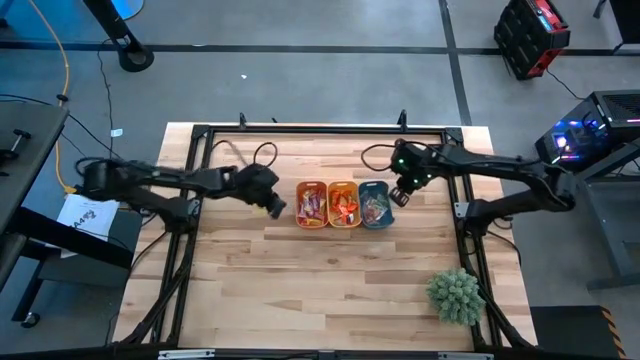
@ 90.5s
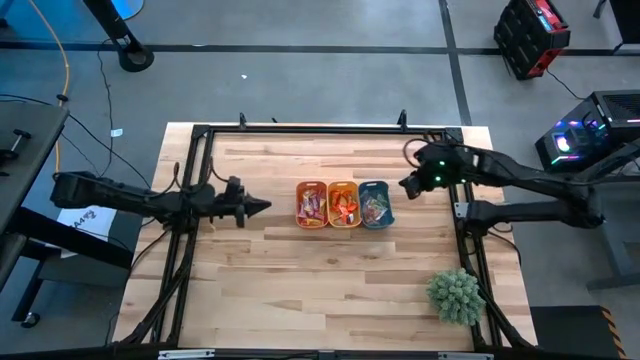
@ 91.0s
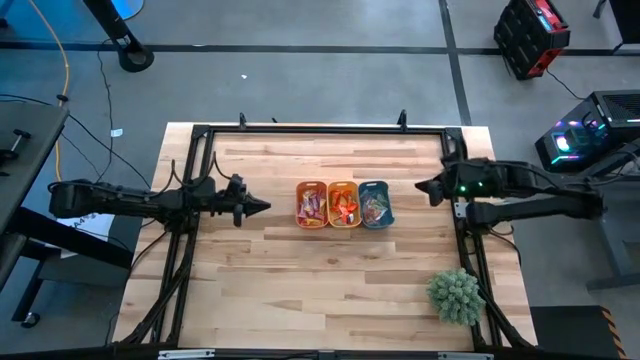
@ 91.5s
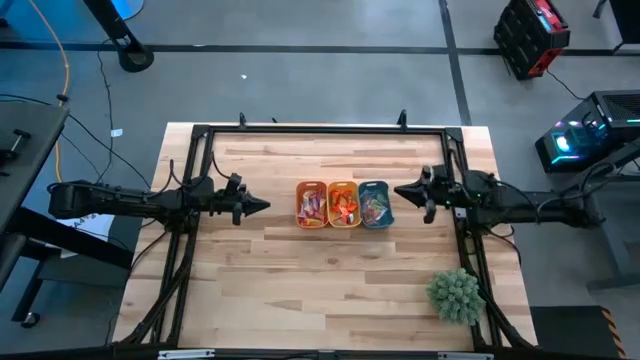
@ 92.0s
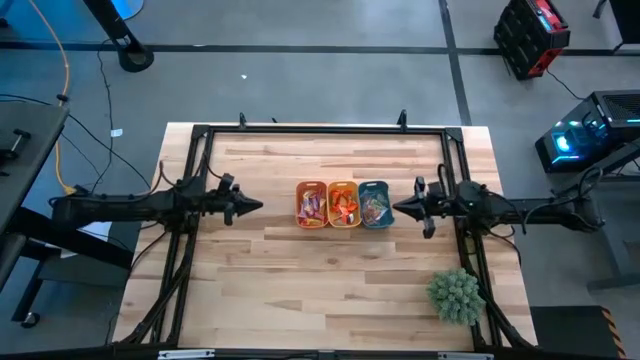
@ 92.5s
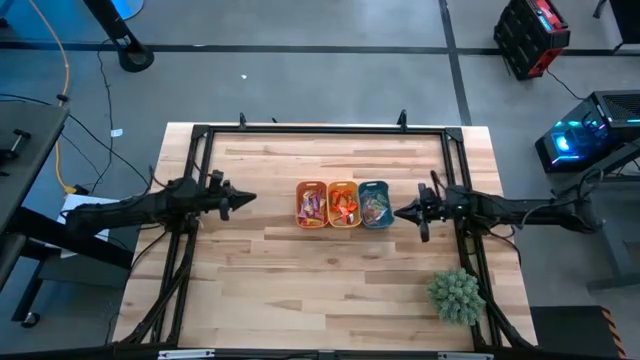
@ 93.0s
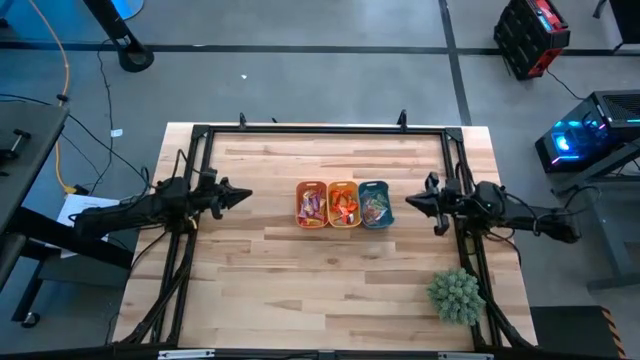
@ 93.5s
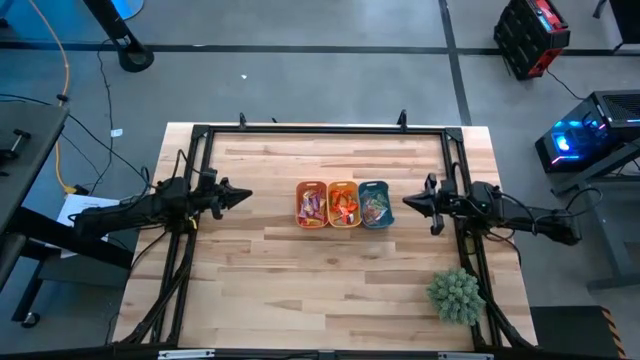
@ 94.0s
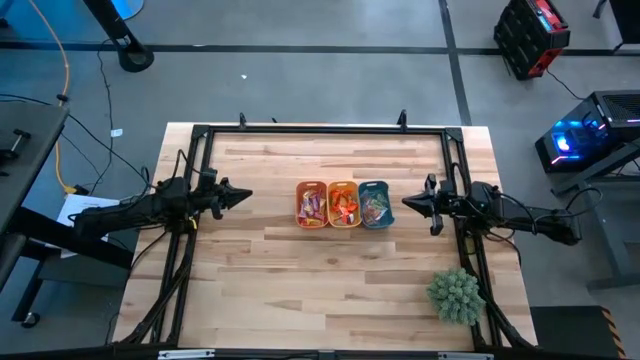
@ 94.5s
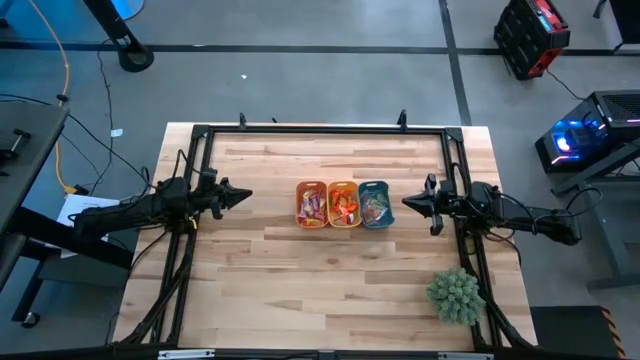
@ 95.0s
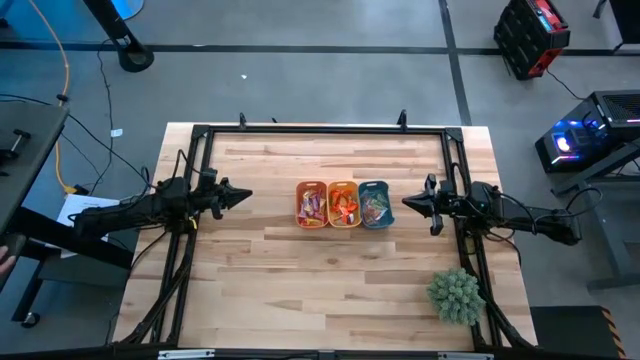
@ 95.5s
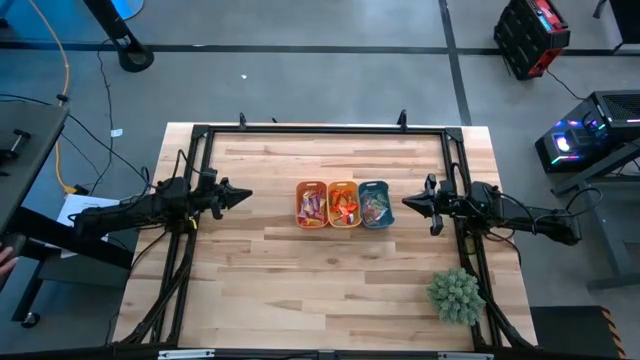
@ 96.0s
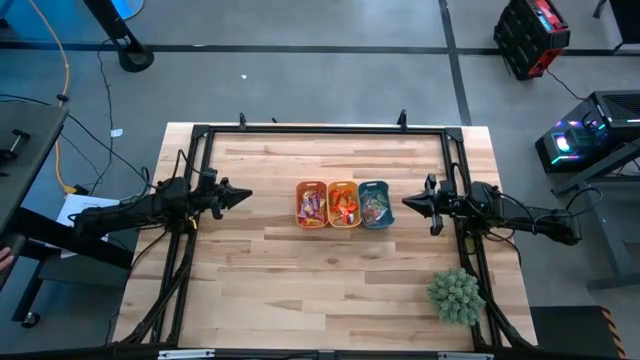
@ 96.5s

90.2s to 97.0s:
Task: Sort candy
Return to Home Position

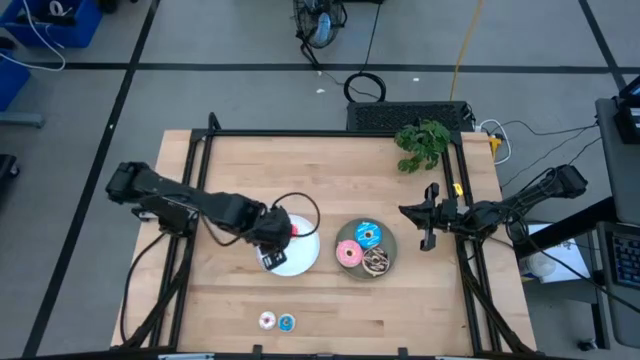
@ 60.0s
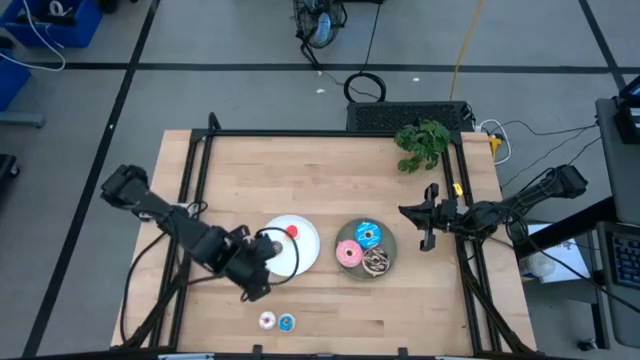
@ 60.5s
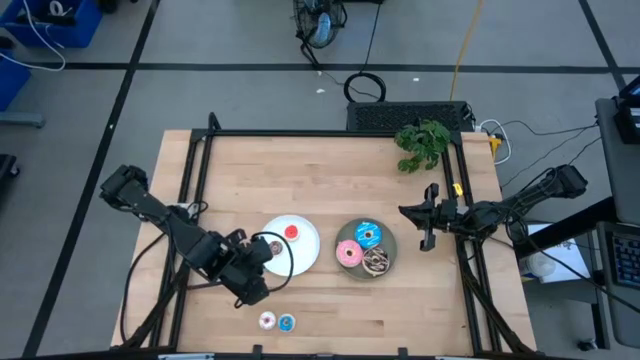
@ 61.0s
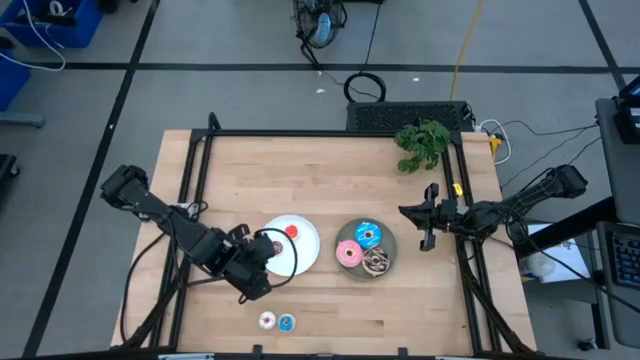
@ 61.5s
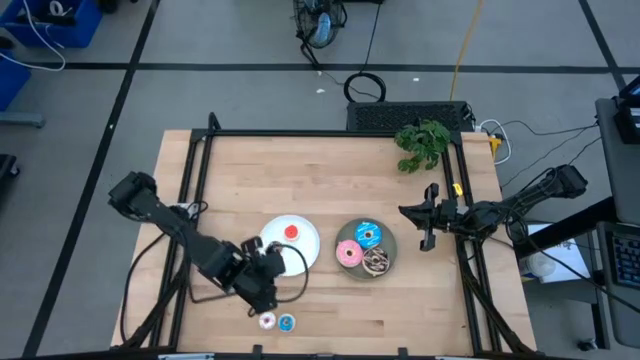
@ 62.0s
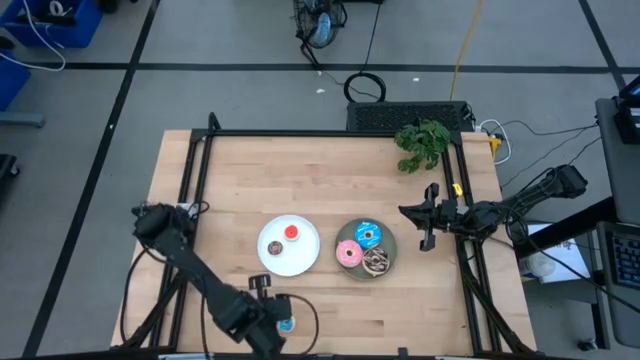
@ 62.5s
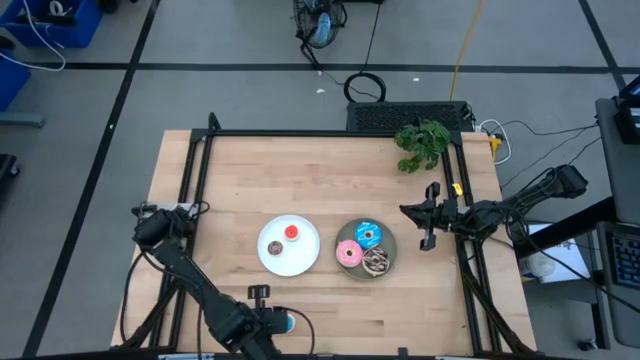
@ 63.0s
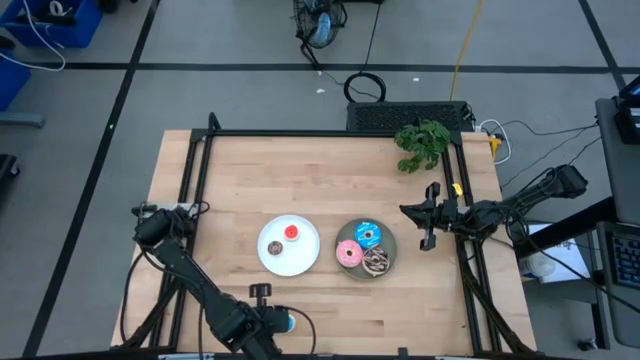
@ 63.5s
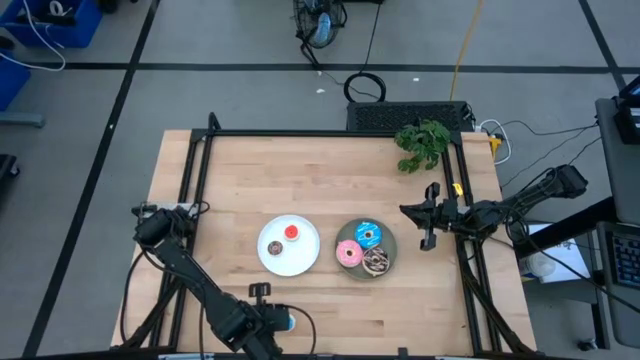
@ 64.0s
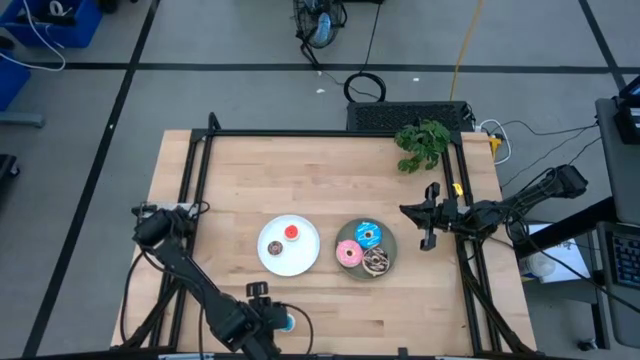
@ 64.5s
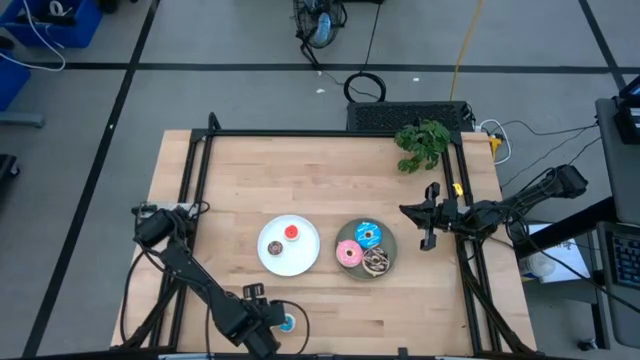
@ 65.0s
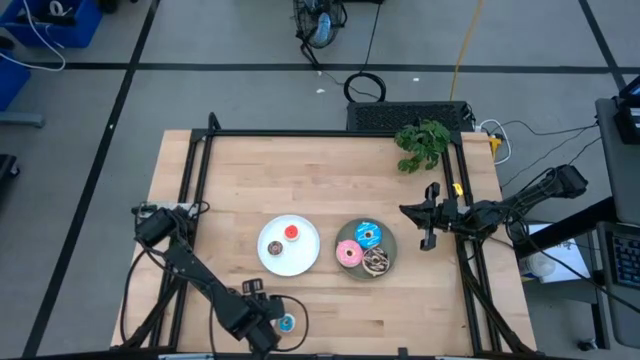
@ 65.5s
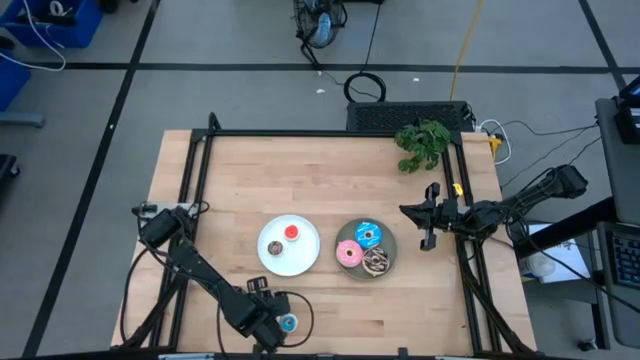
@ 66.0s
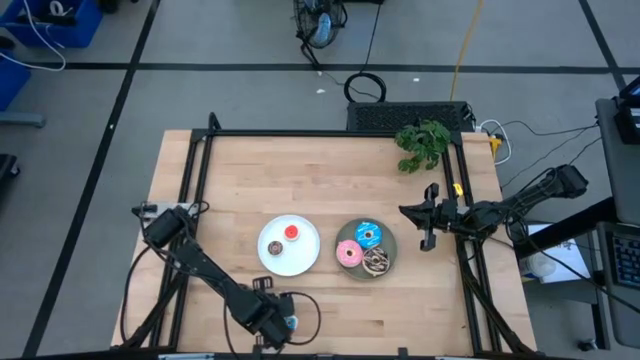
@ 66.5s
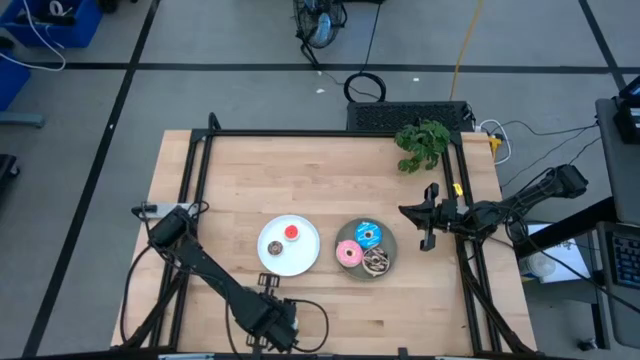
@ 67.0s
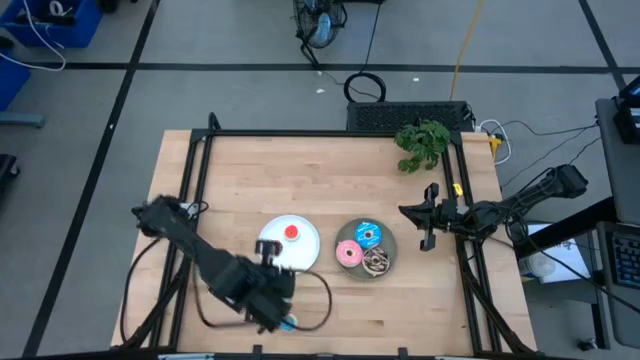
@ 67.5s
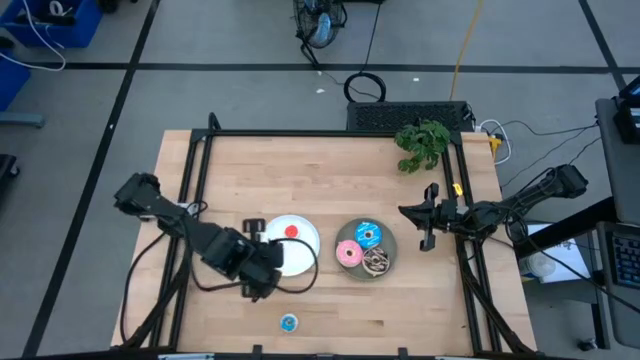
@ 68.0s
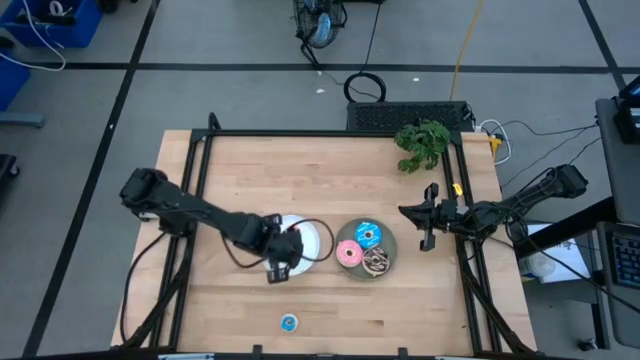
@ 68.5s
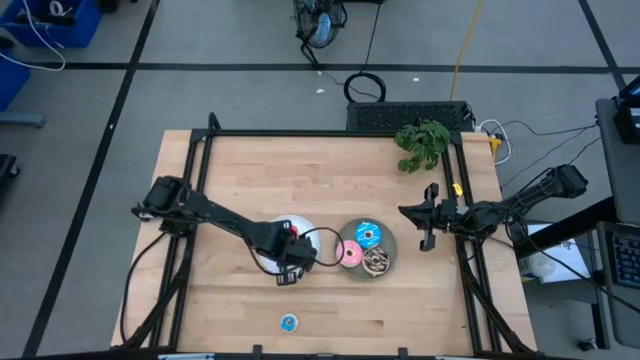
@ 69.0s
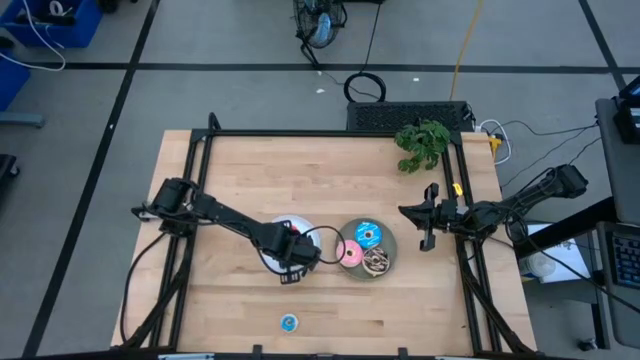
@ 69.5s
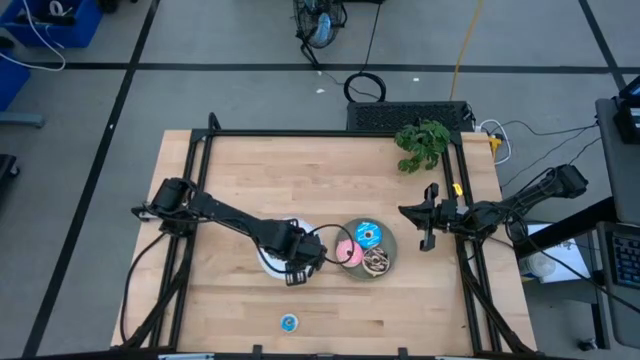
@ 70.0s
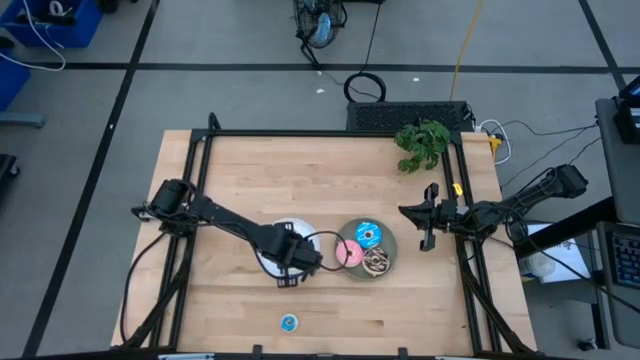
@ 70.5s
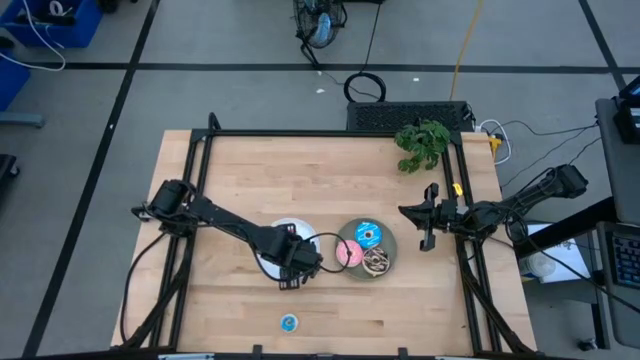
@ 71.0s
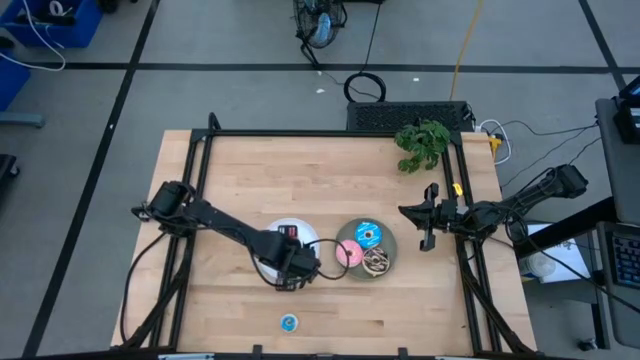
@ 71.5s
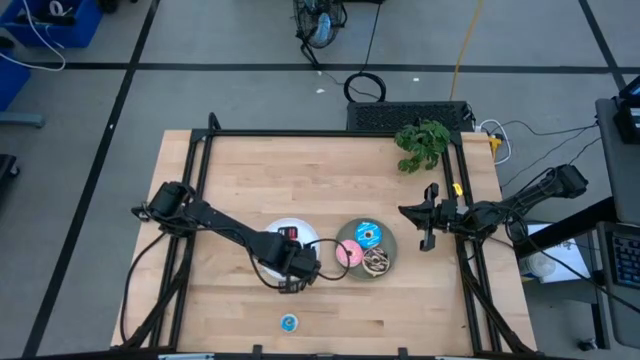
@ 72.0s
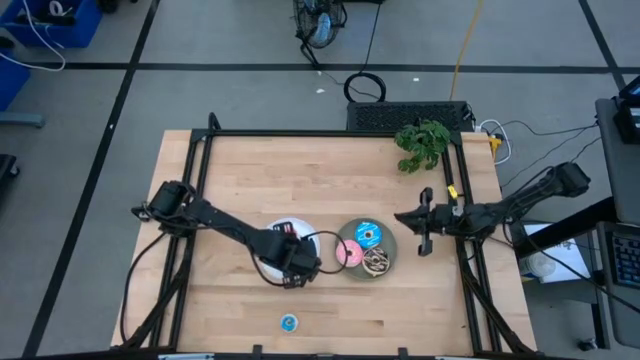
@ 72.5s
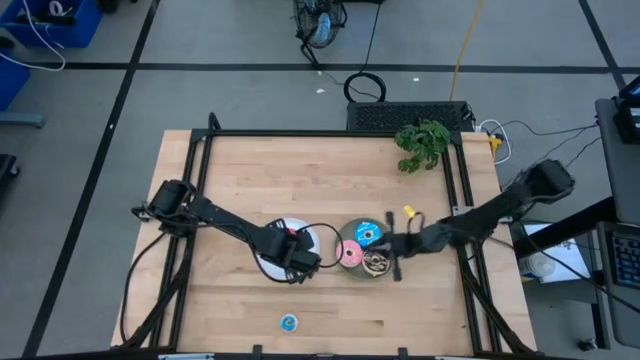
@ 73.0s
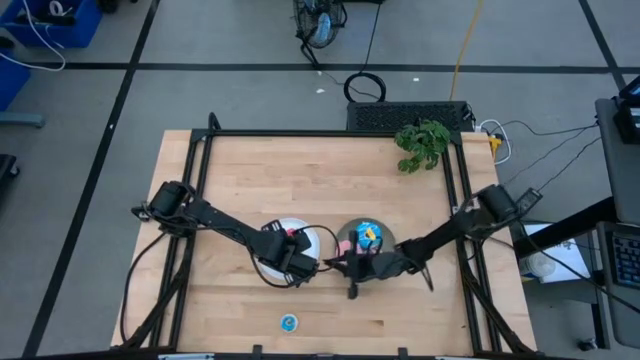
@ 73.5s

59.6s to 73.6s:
Task: Pick & Place donuts
Put the small white donut on the white plate
